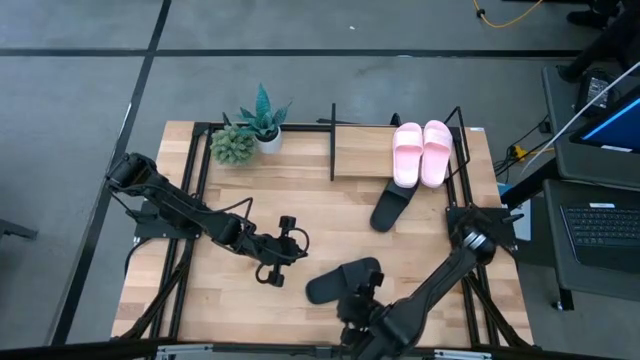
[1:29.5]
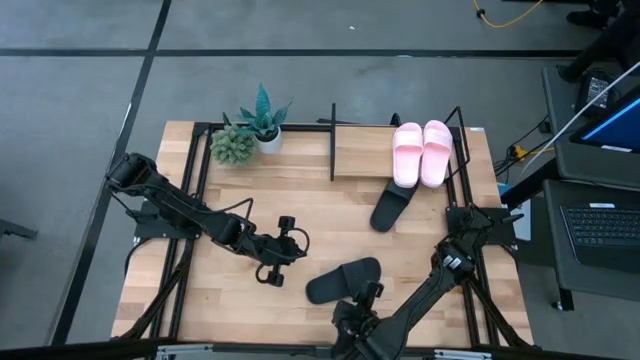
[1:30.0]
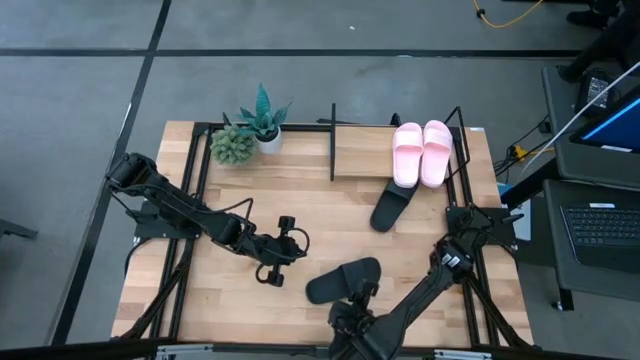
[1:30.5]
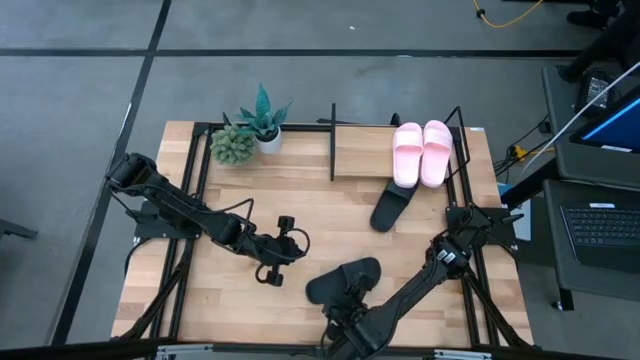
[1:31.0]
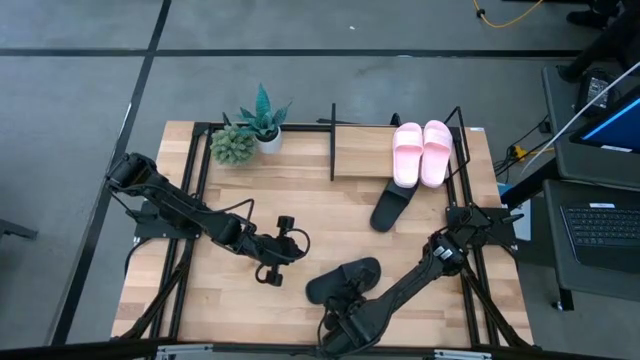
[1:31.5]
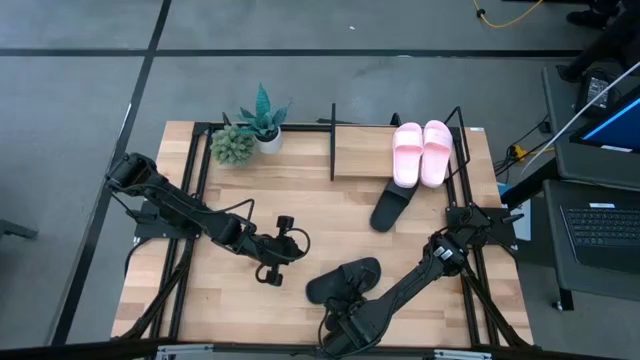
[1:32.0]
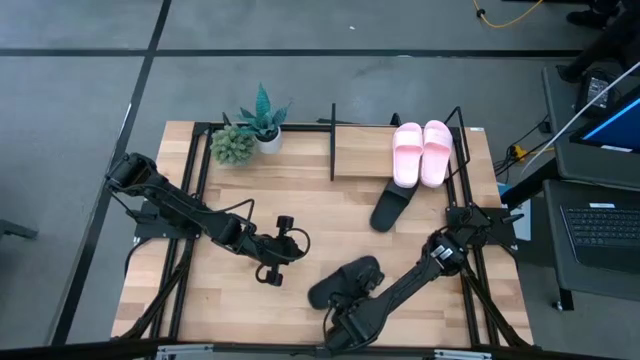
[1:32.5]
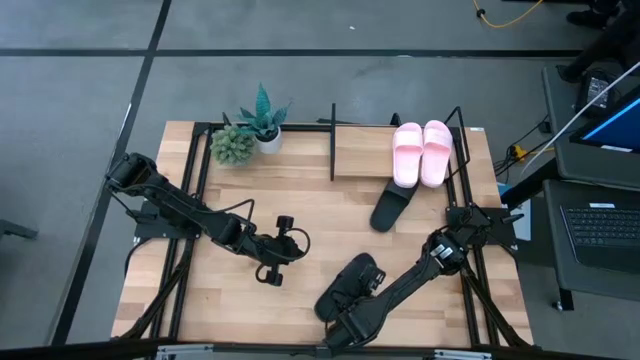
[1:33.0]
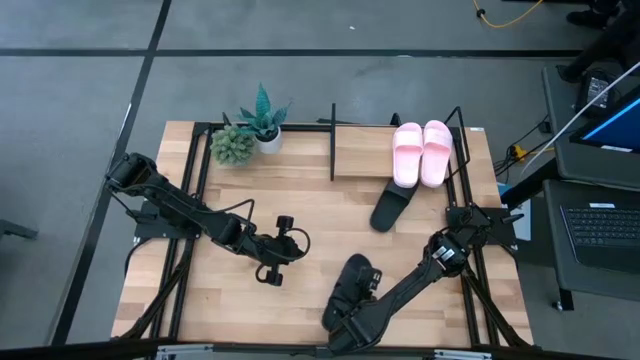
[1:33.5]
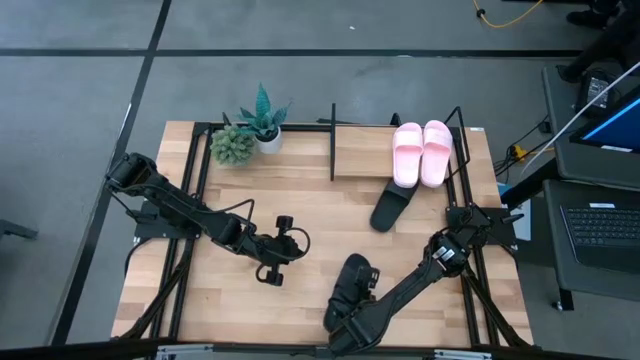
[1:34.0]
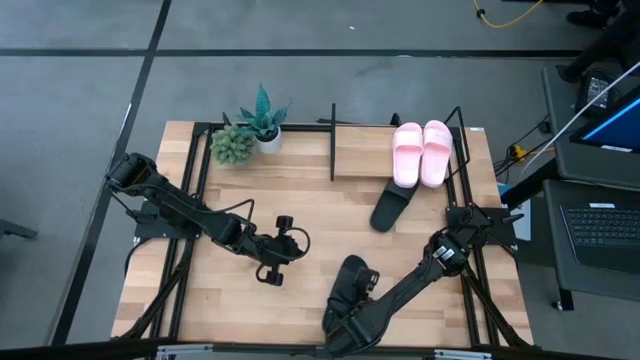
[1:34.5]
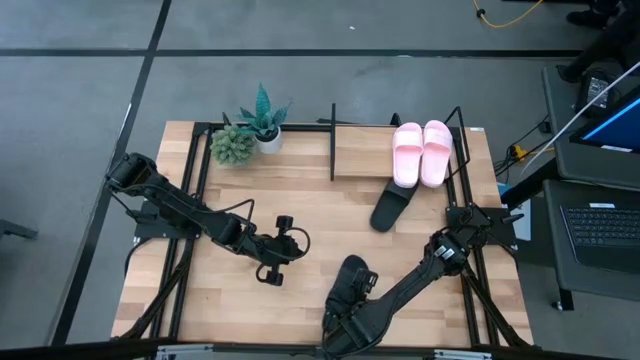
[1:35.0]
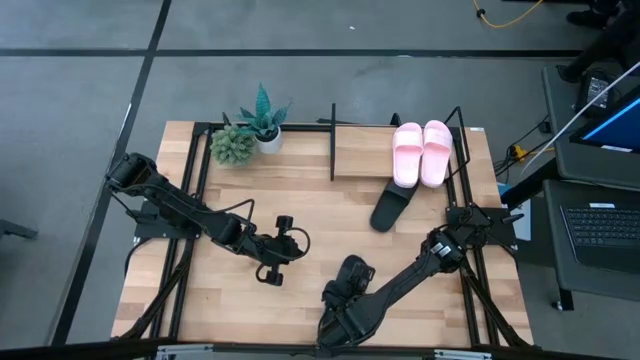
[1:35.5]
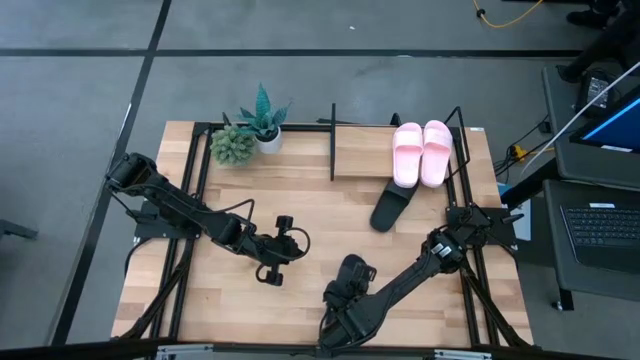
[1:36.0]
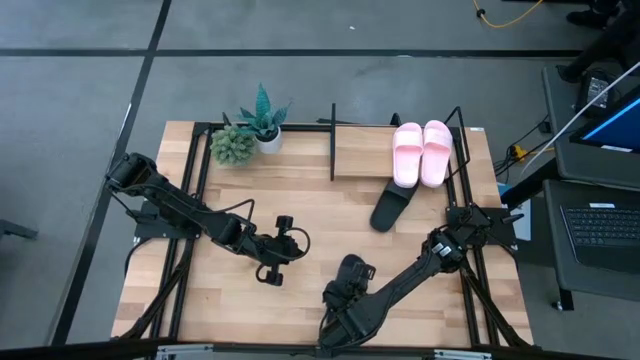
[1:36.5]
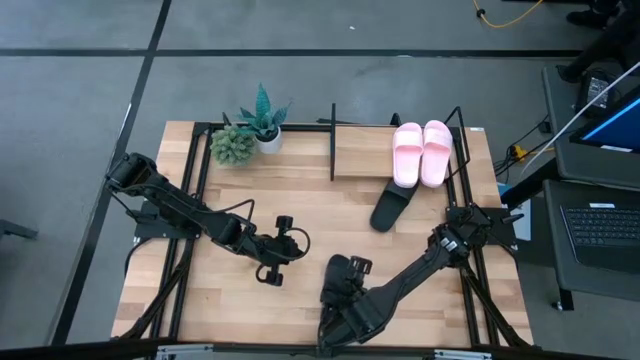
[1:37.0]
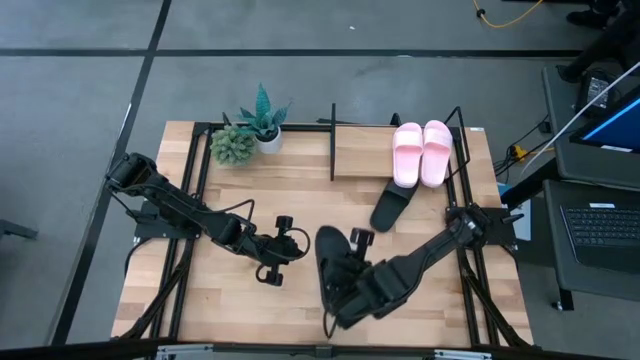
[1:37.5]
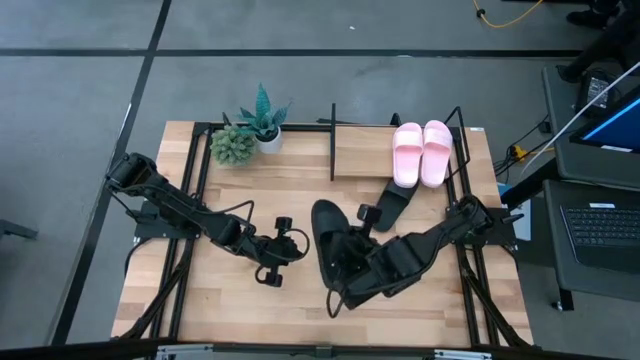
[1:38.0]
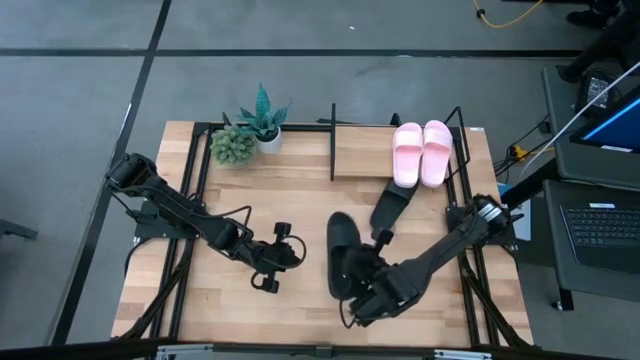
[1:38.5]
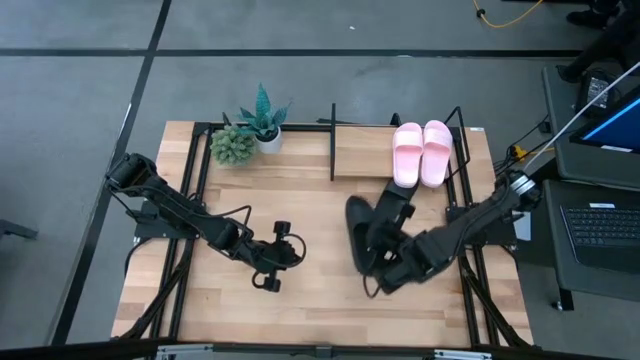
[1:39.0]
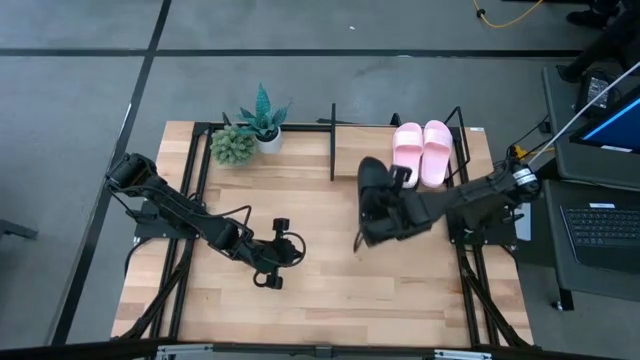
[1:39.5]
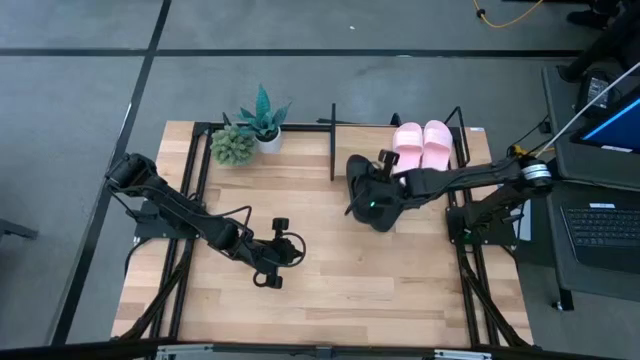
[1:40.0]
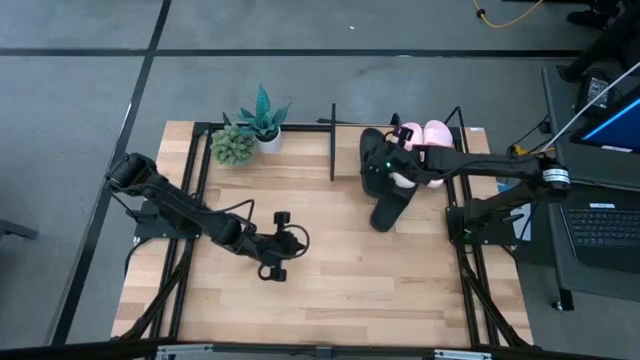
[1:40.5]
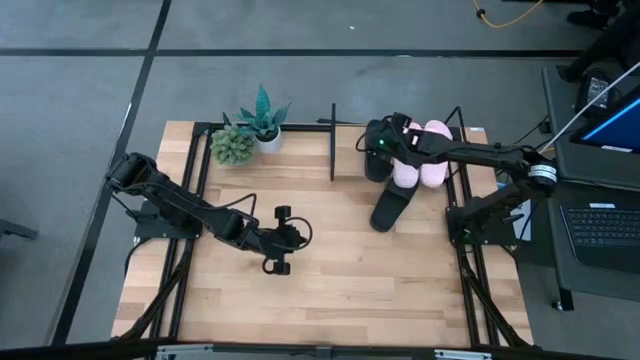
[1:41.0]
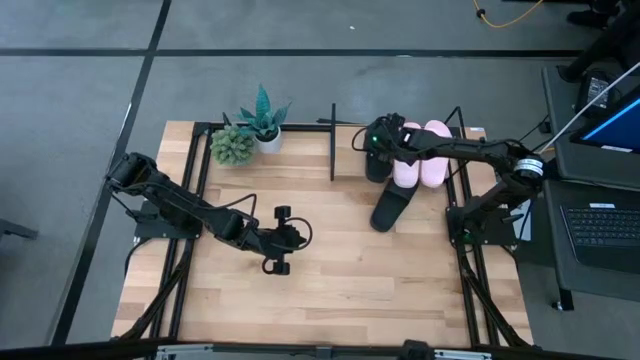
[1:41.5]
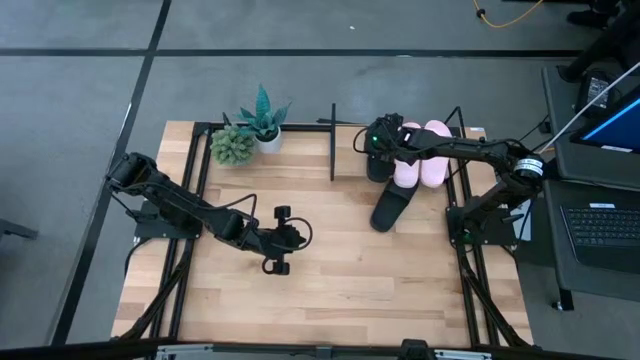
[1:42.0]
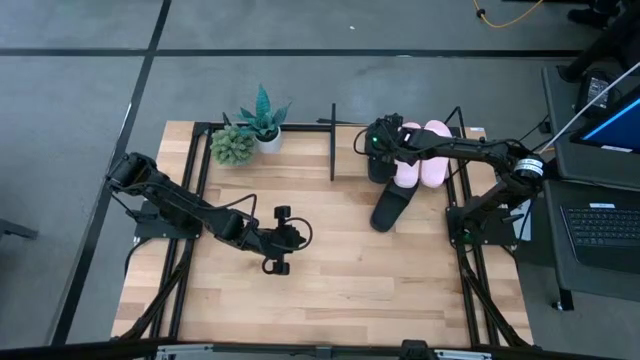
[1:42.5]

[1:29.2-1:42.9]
Task: Pick and place slides into the shelf
Put the bottom black slide on the shelf

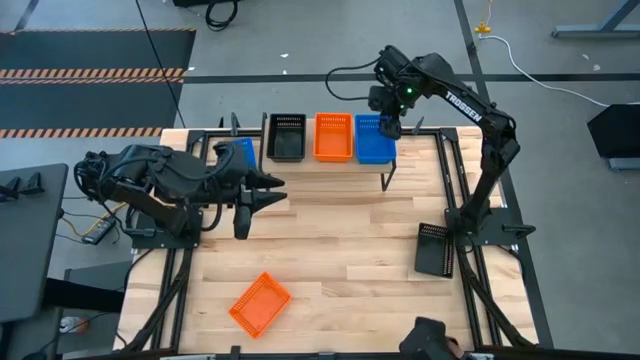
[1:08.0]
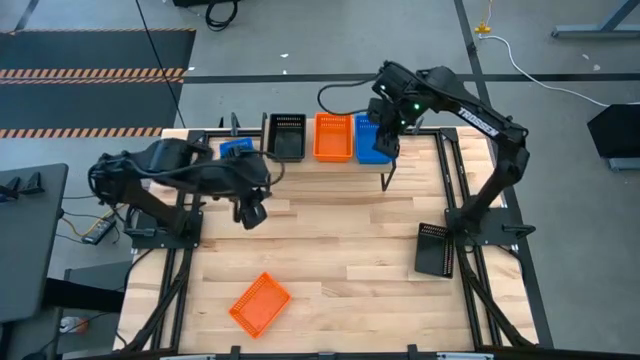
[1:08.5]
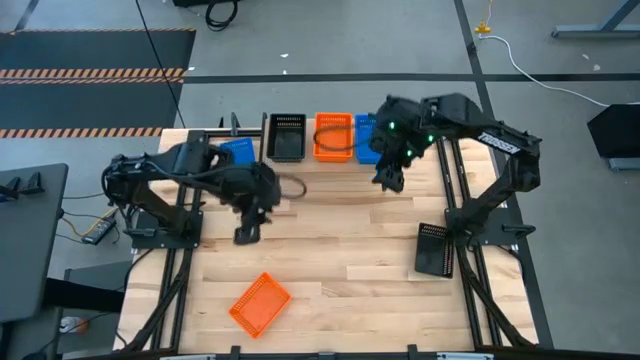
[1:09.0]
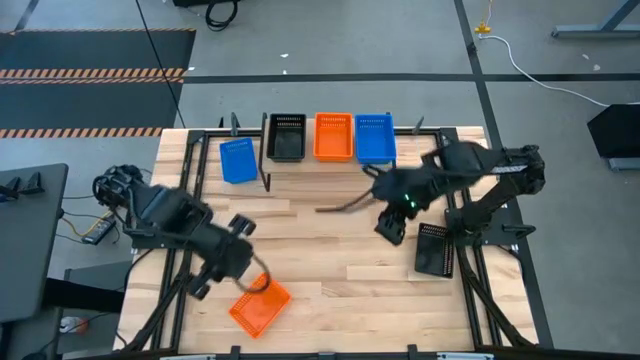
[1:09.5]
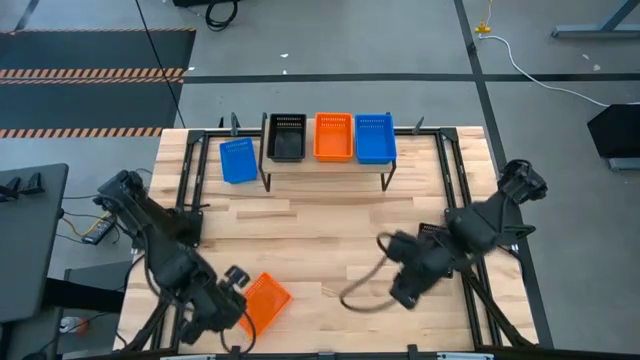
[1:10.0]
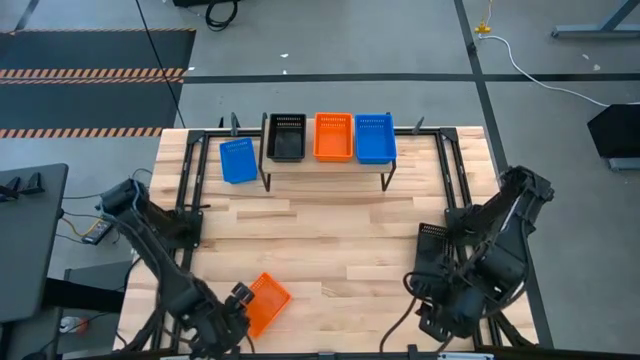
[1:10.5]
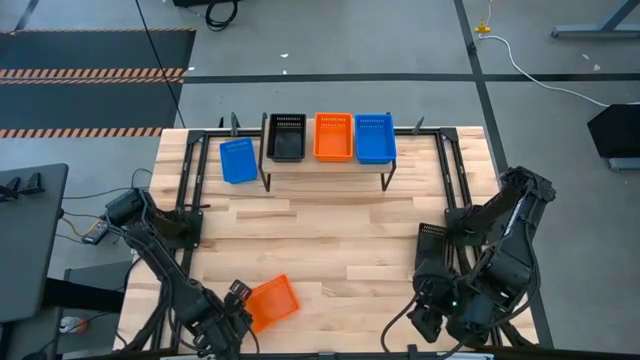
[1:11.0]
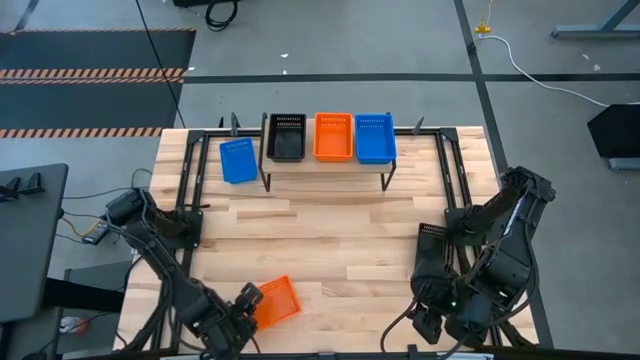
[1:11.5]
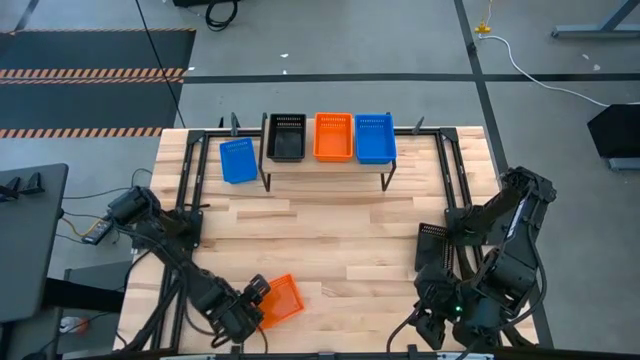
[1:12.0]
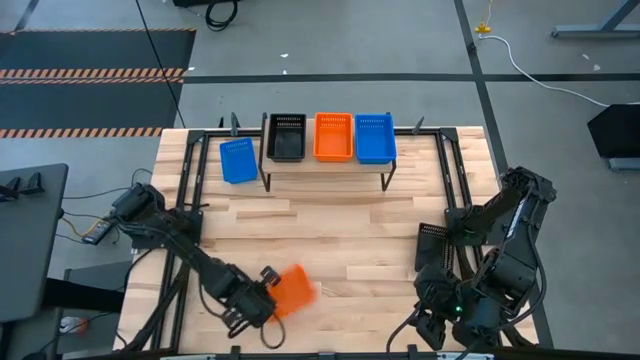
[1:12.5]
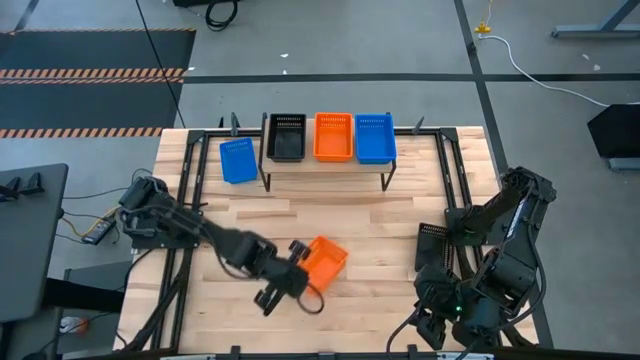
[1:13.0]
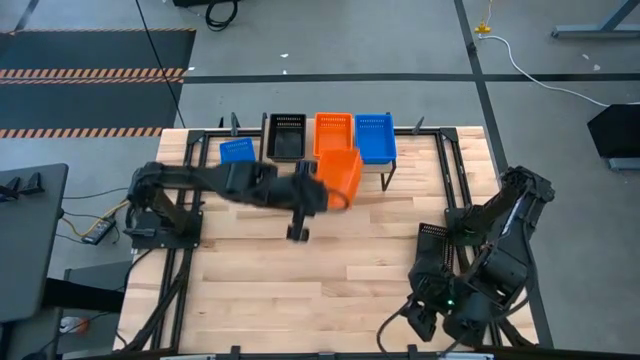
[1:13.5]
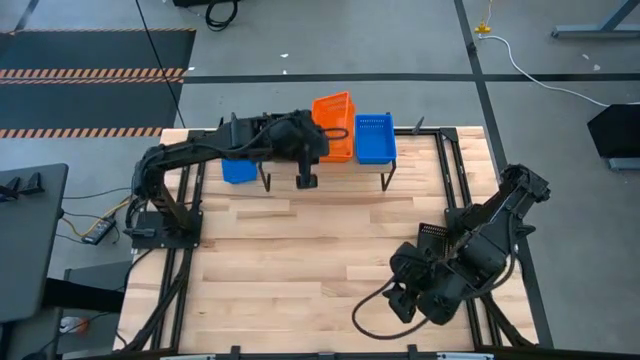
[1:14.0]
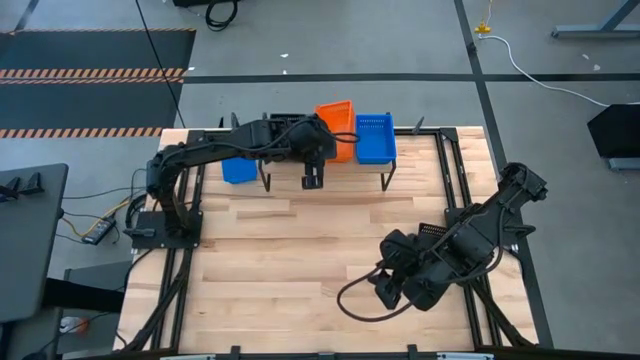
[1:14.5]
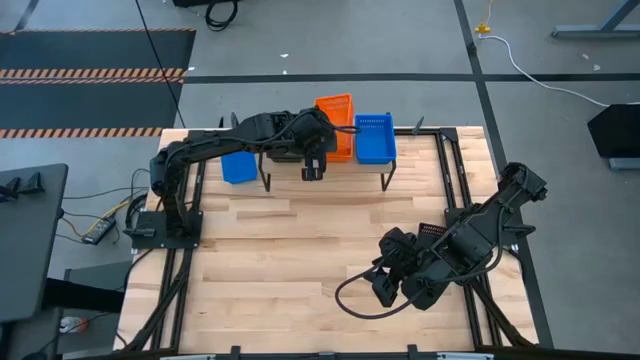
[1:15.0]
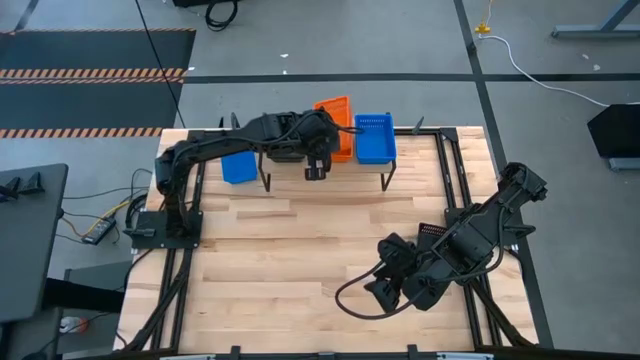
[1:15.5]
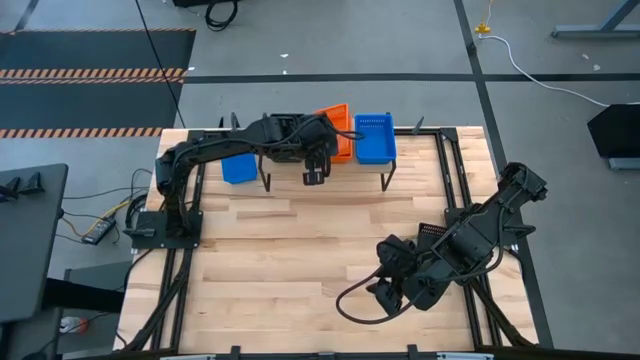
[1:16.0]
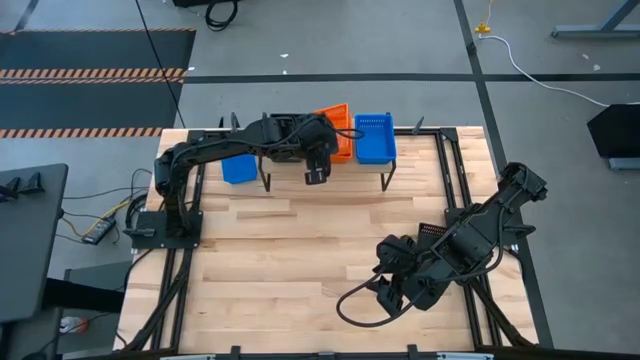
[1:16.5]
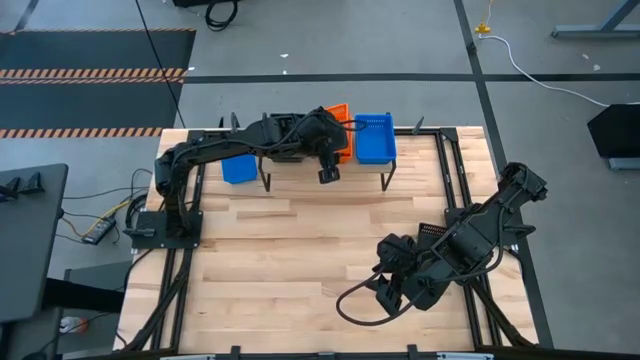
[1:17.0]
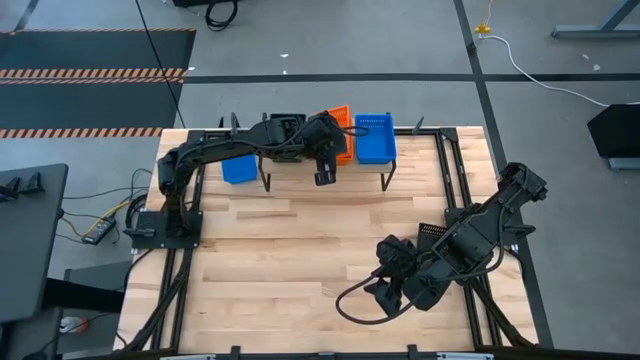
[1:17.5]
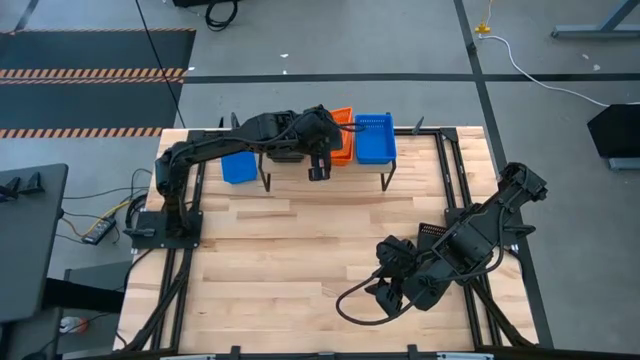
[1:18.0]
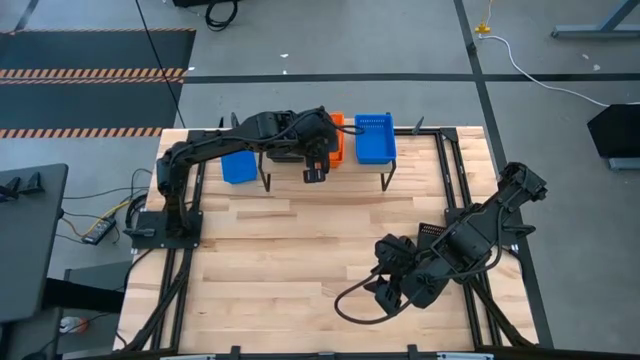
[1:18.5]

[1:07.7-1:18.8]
Task: Stack baskets on shelf by color
Stack the orange bin on top of the orange bin on the shelf
